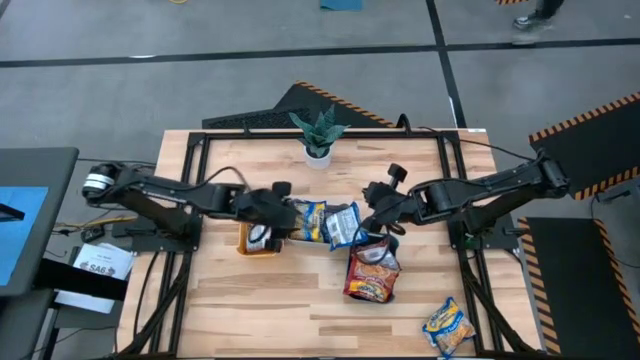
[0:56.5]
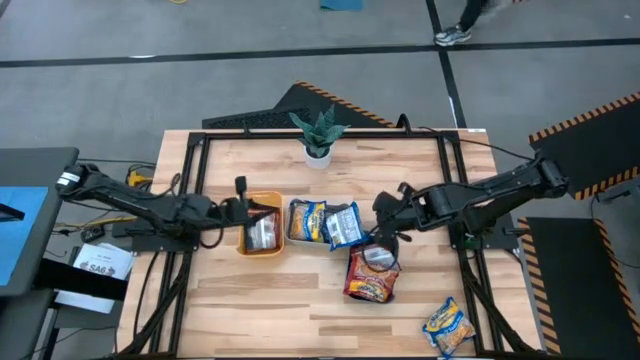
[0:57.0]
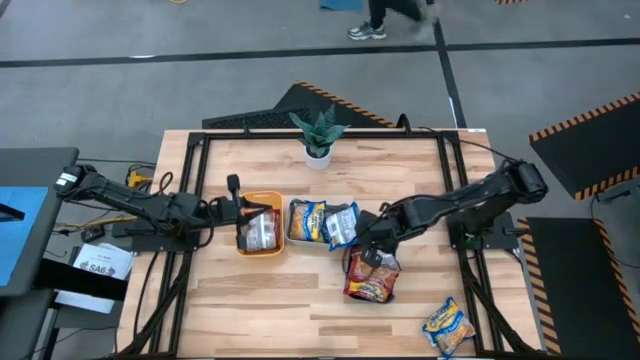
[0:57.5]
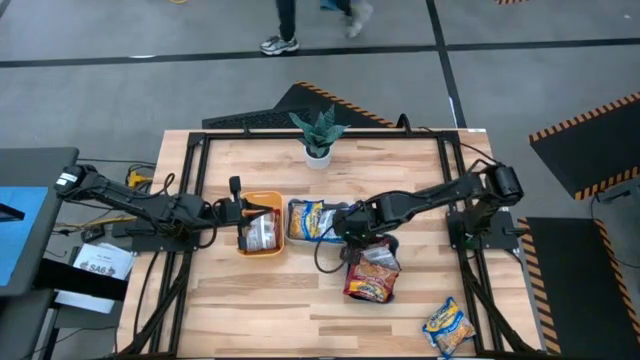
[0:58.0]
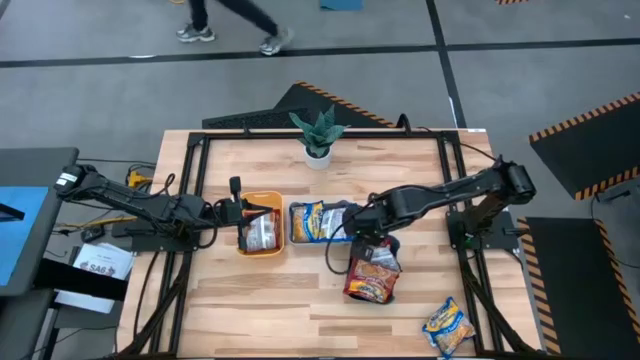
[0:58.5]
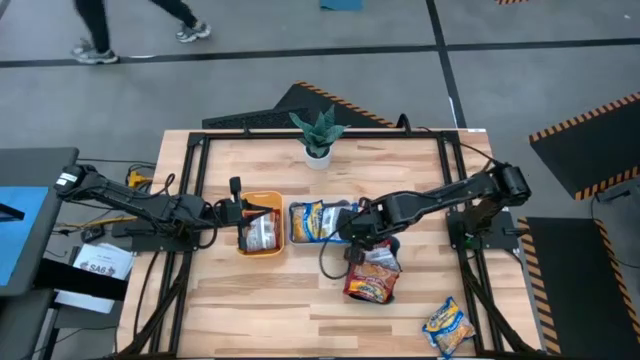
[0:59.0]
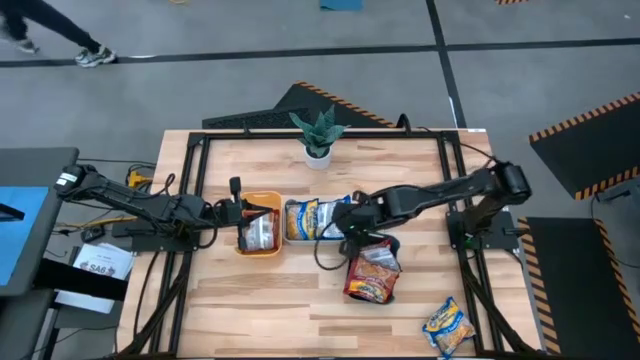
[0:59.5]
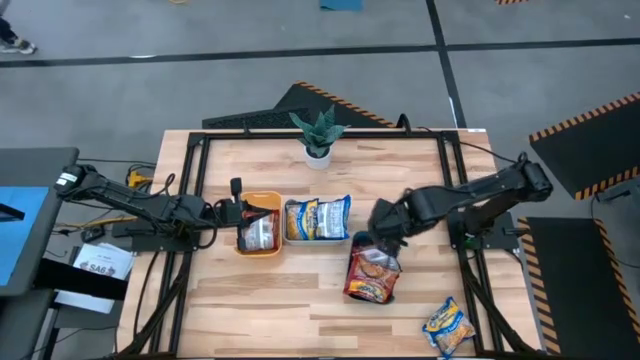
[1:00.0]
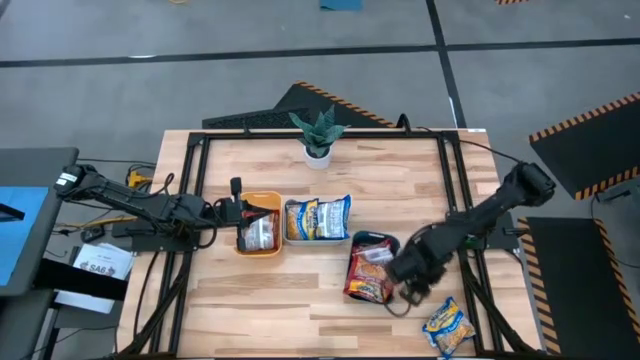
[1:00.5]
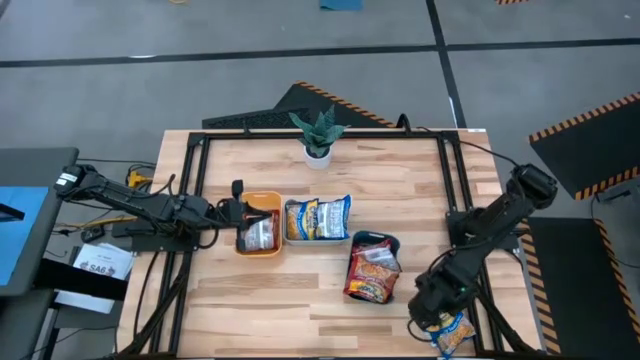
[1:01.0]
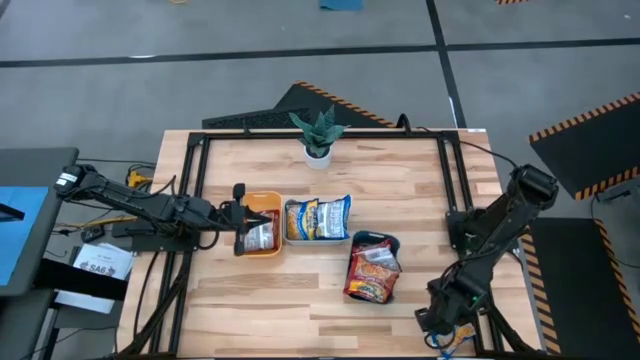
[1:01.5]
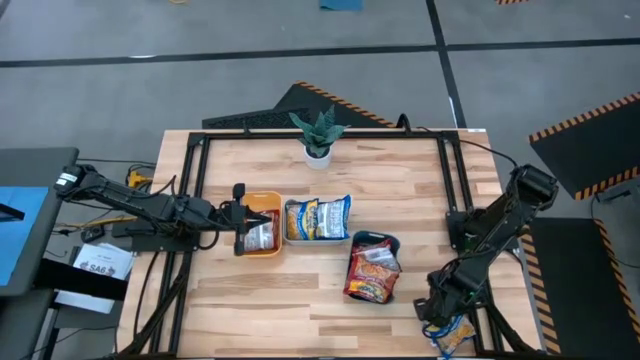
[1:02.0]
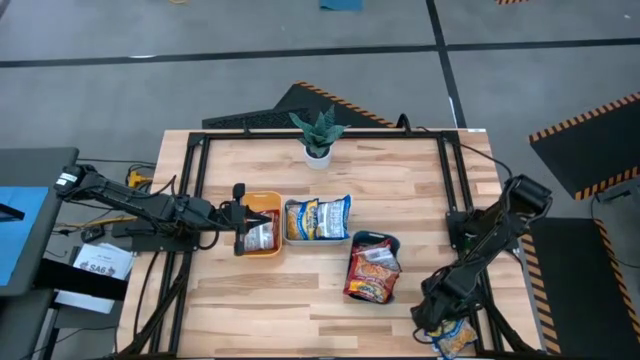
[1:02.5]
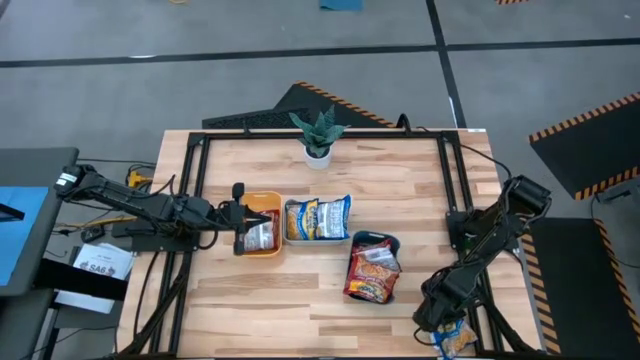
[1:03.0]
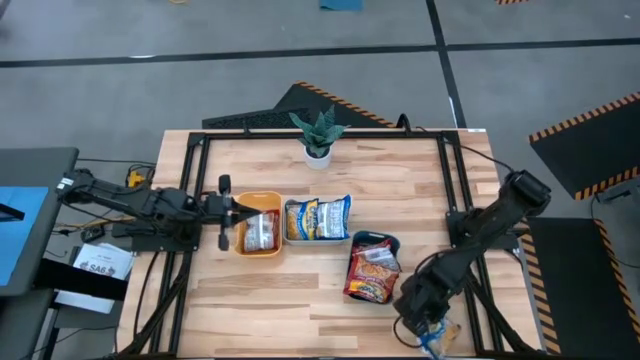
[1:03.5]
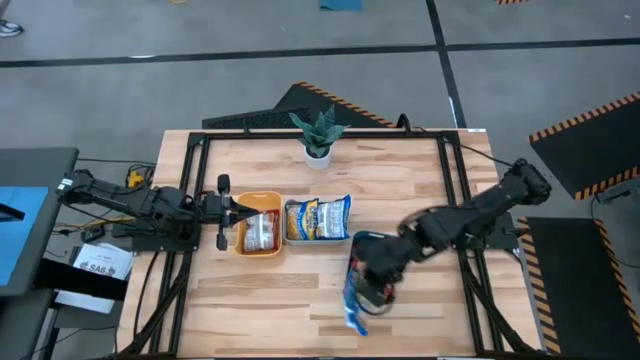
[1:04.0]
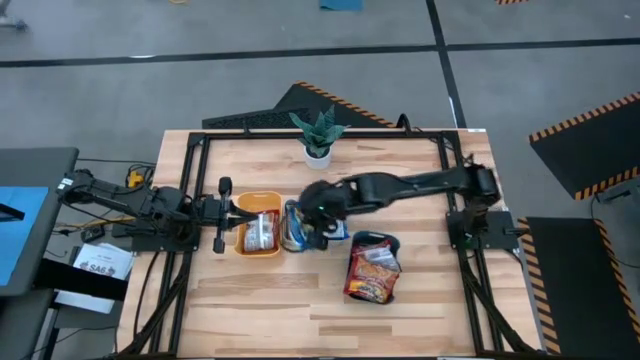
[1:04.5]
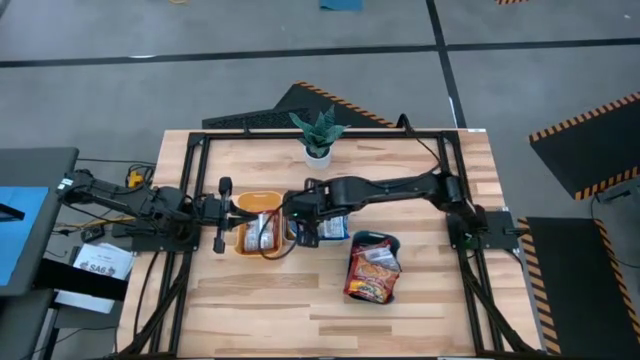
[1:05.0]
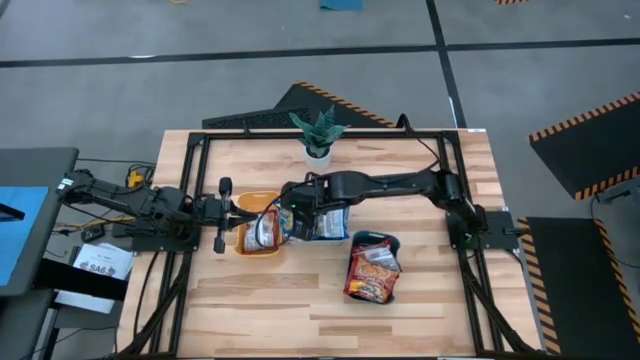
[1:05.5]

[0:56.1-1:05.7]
Task: Sort Maruchan noodles
Put the blue noodle pack into the gray bin

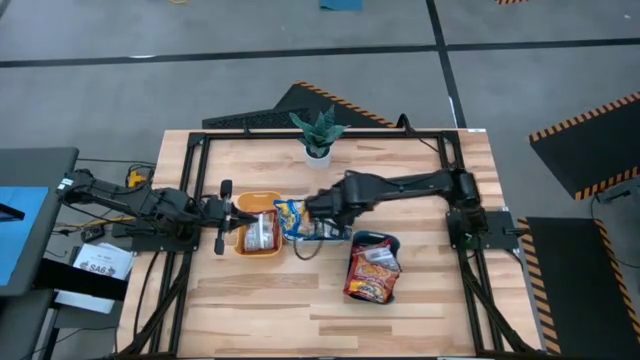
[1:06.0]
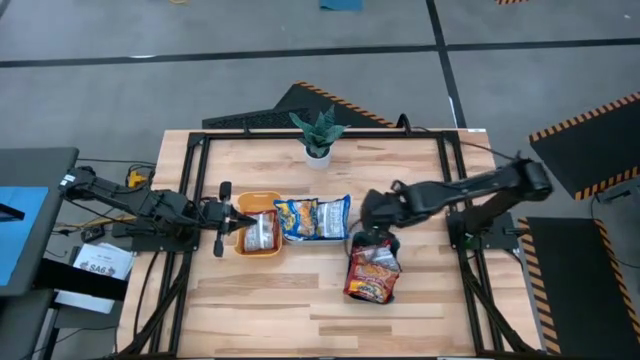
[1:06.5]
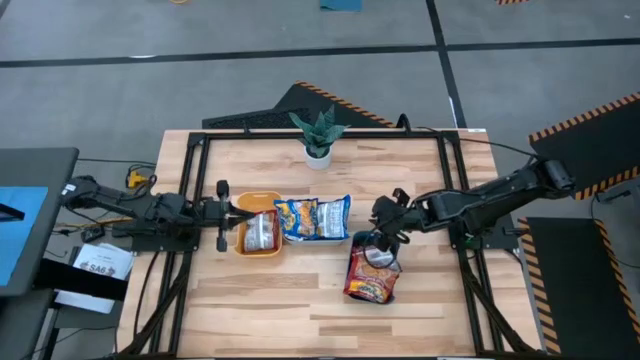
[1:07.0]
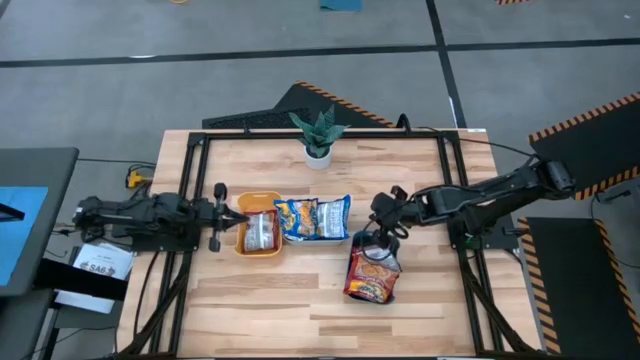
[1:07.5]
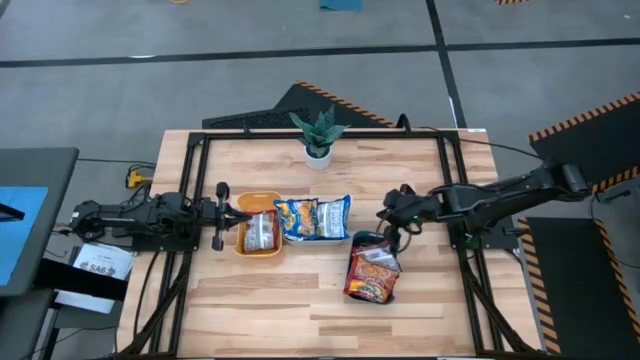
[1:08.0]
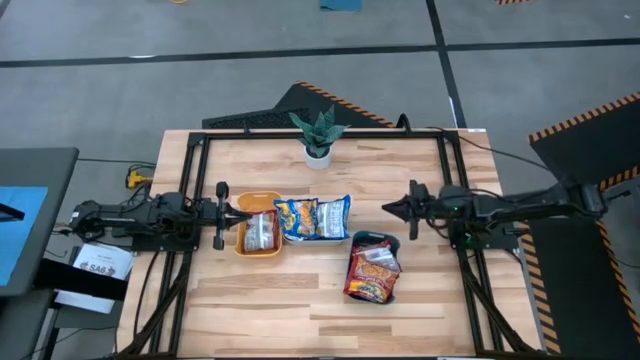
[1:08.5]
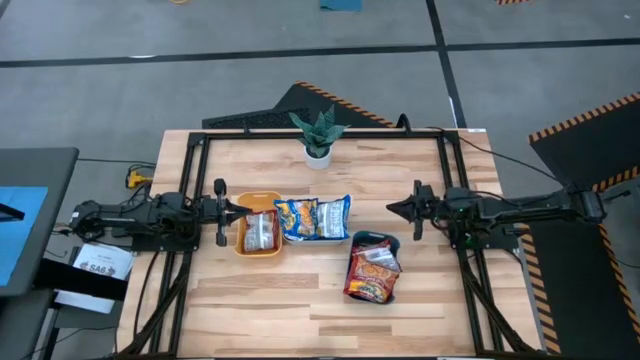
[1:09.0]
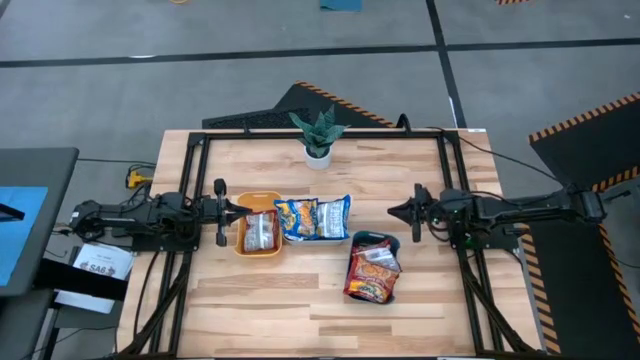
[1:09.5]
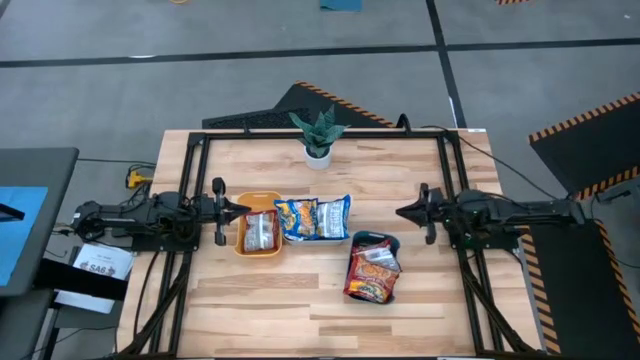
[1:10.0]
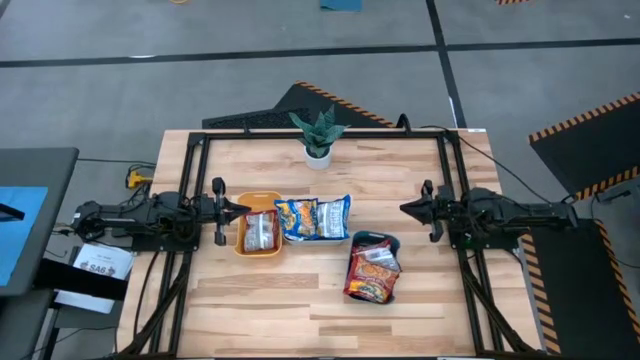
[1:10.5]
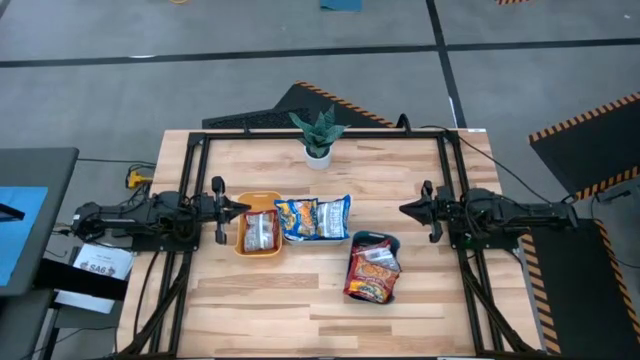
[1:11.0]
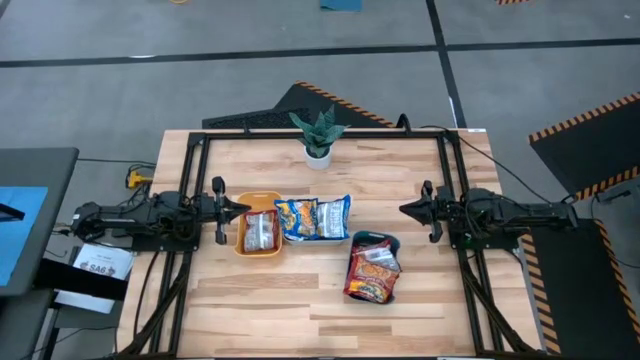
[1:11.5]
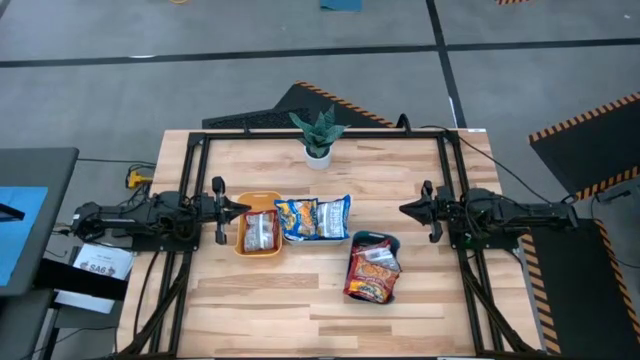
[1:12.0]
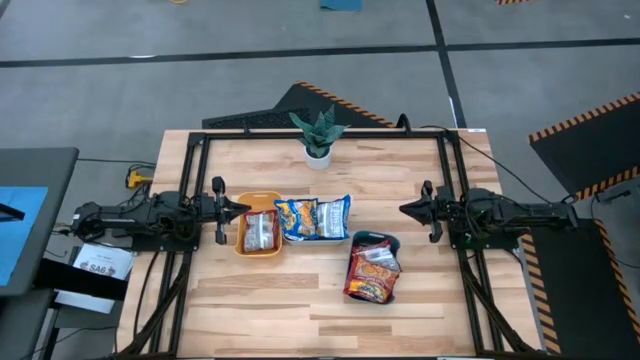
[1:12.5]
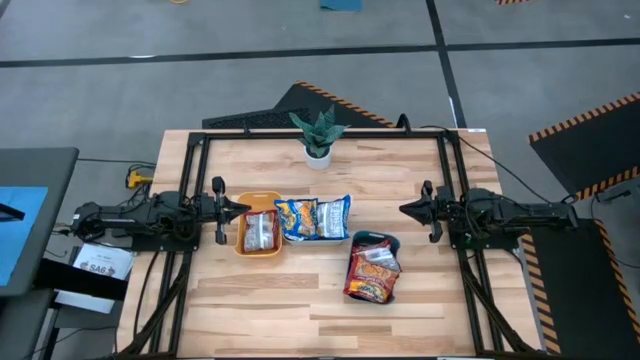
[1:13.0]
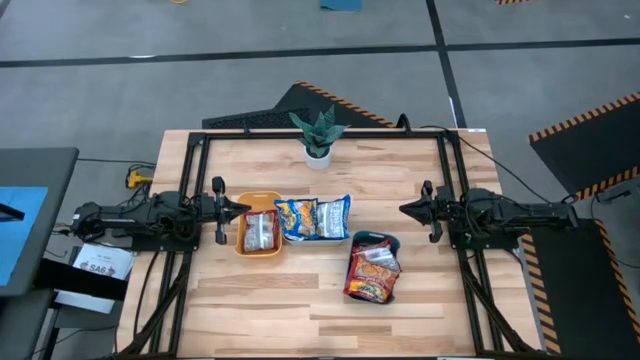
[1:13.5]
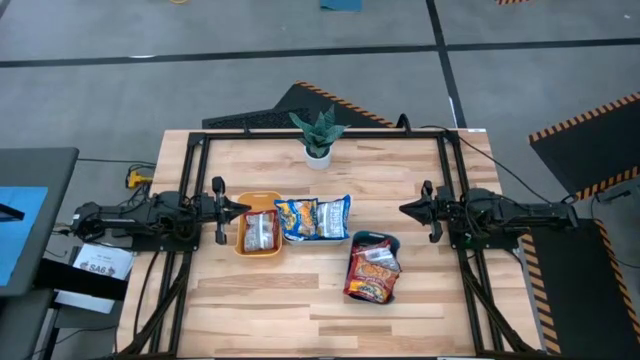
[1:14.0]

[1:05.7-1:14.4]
Return to Home Position

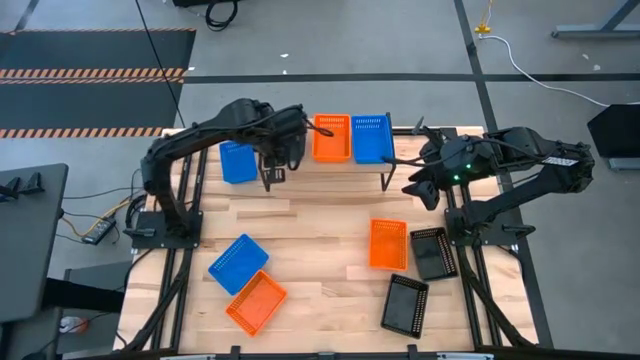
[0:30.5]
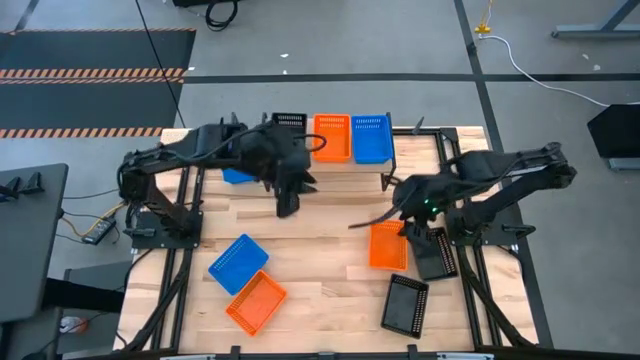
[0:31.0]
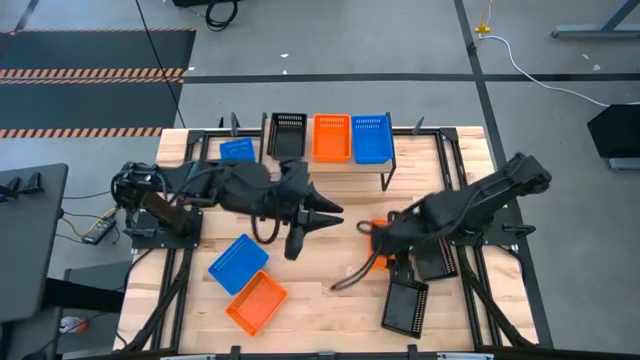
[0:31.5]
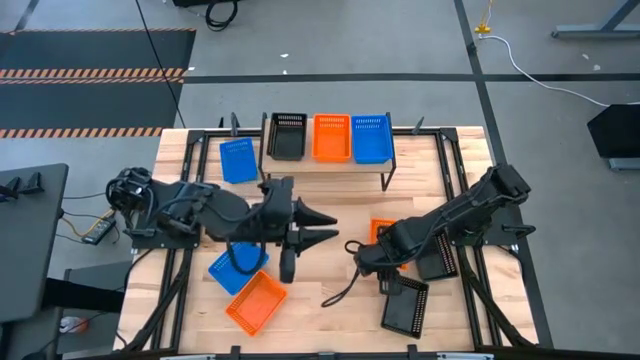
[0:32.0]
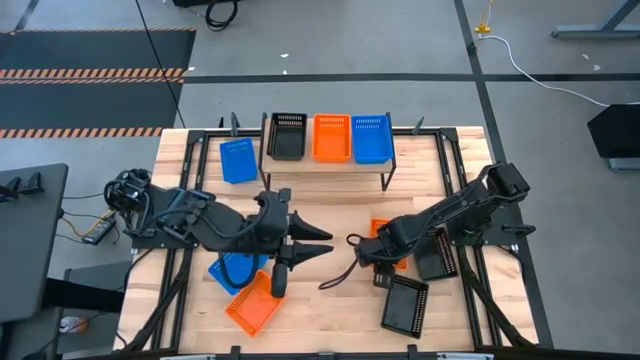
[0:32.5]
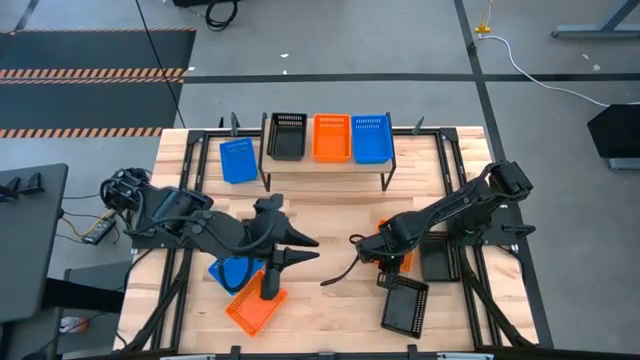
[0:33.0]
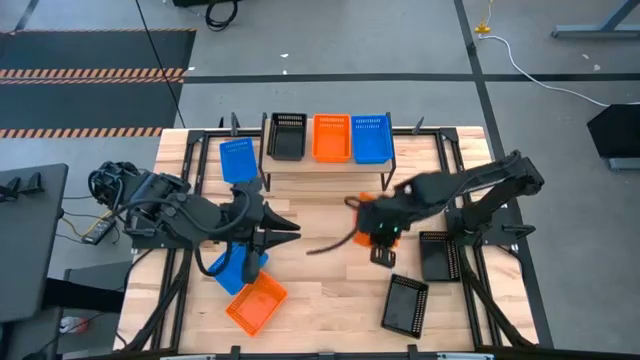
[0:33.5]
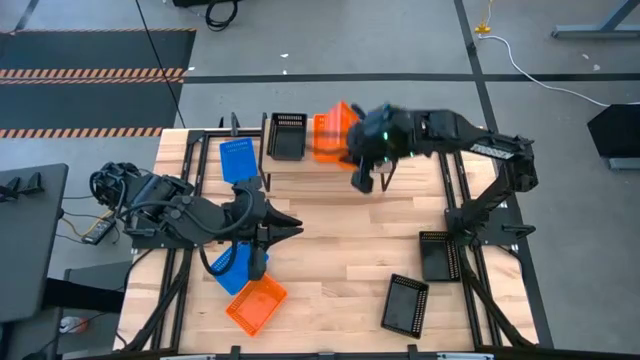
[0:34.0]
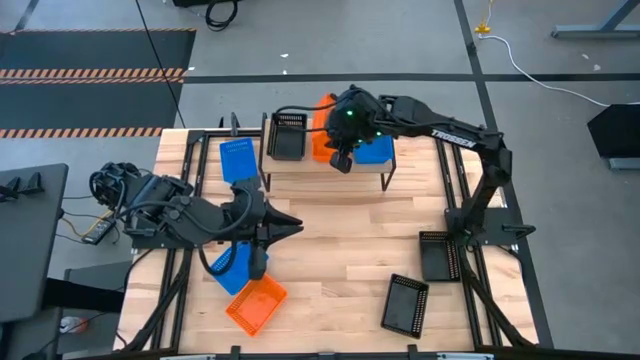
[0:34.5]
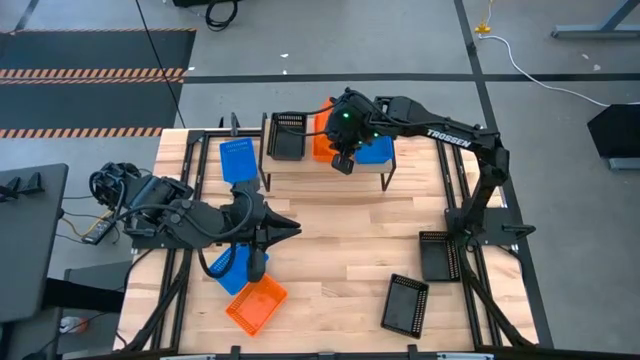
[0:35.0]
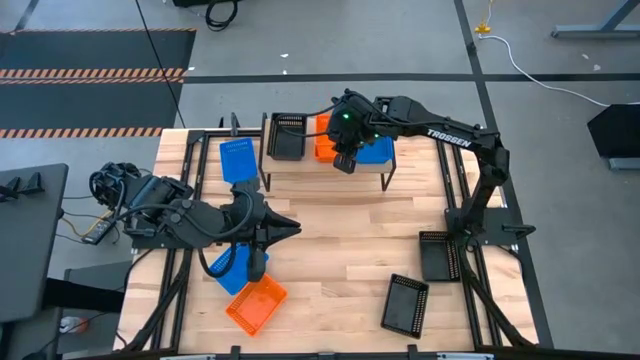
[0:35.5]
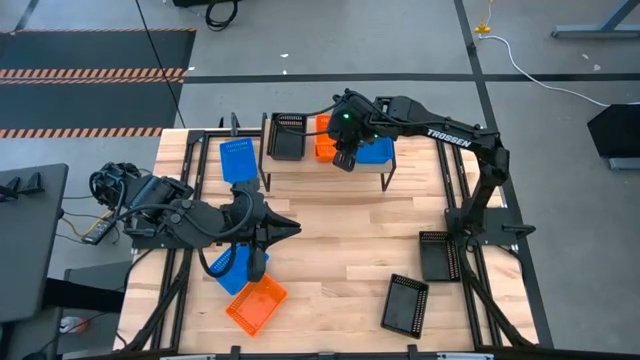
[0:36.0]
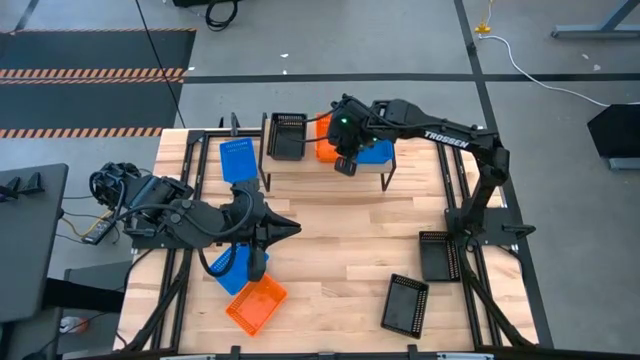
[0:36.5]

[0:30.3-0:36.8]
Task: Stack baskets on shelf by color
Stack the right orange bin on top of the orange bin on the shelf
